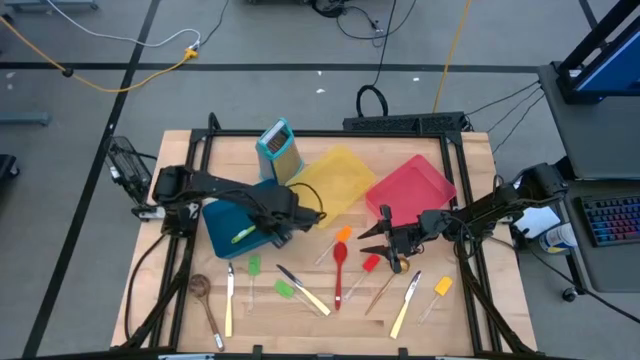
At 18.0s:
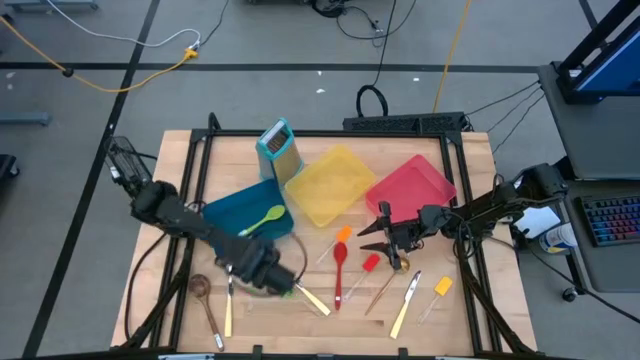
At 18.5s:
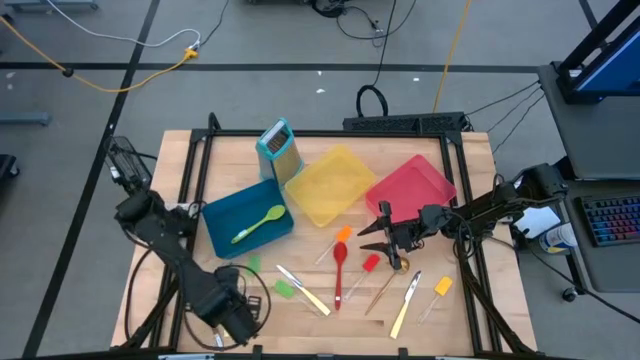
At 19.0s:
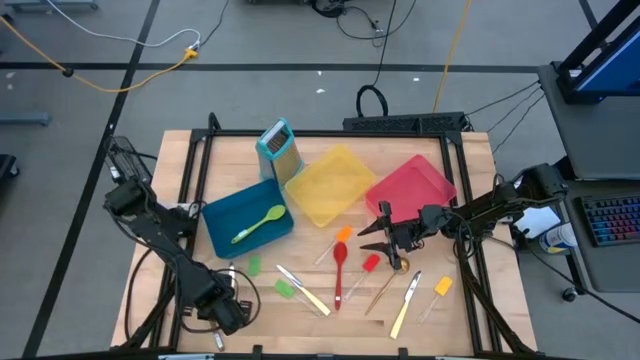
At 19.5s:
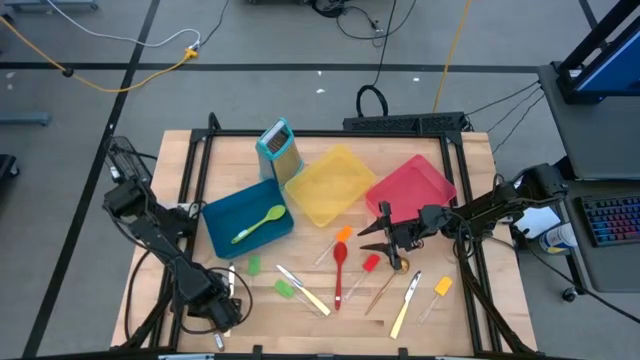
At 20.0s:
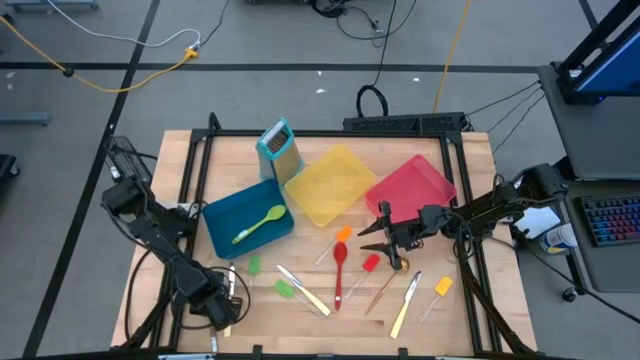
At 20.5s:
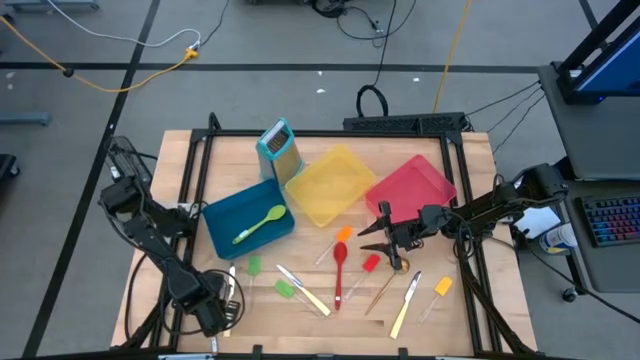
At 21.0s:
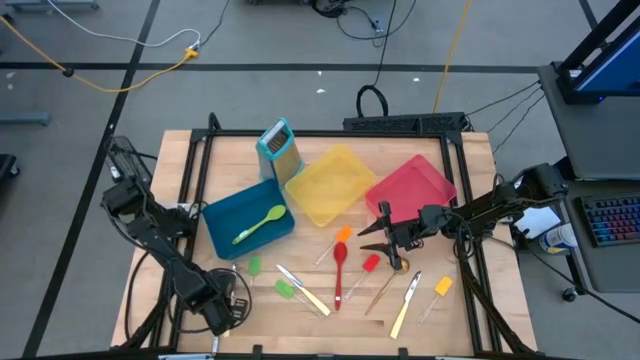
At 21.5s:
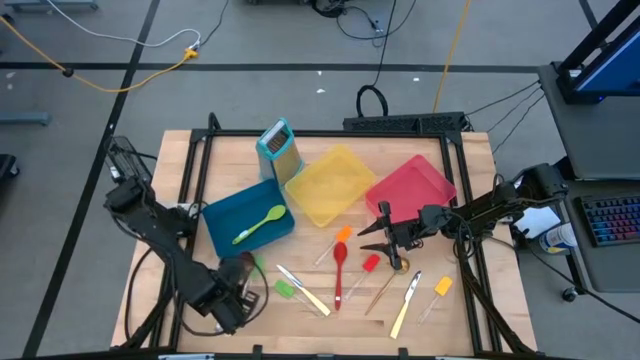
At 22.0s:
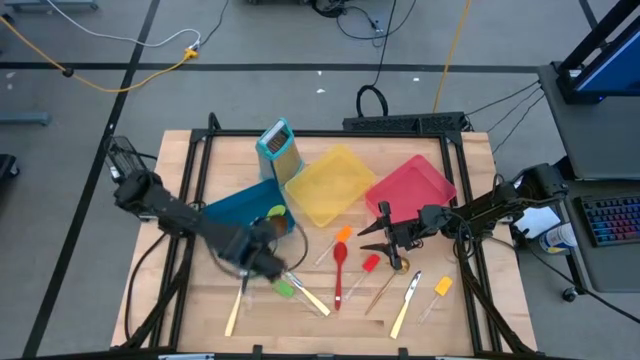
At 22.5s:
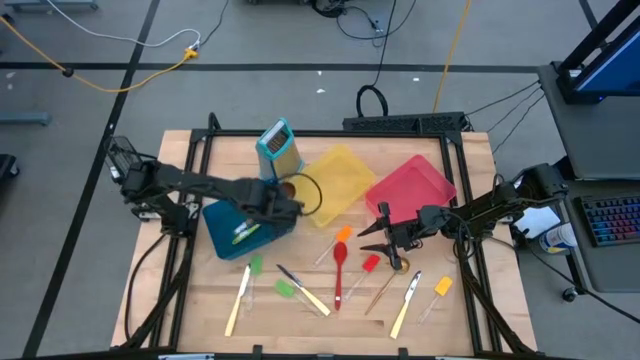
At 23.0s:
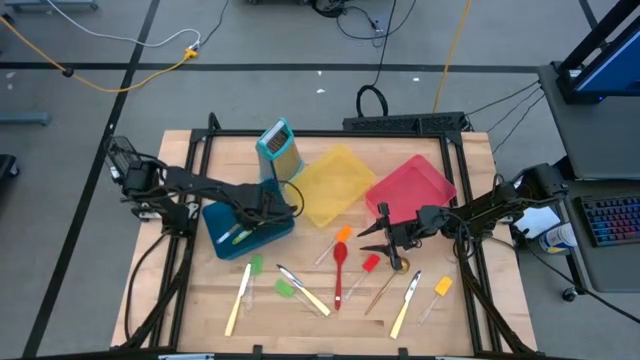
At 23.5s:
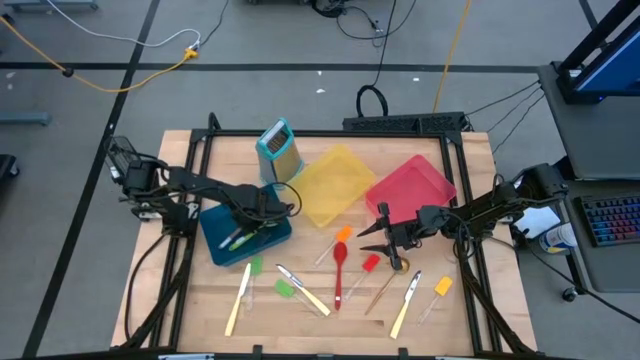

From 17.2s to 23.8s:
Task: Pick & Place Kitchen Items
Put the brown serving spoon into the blue bin

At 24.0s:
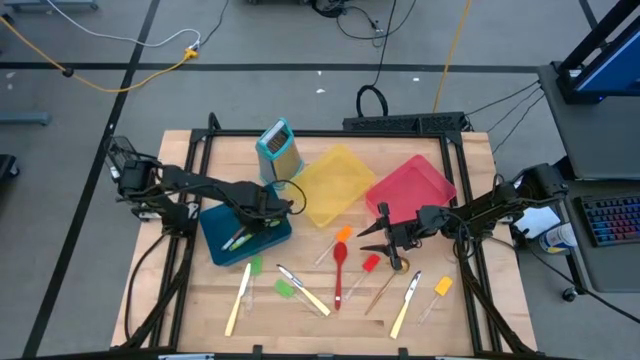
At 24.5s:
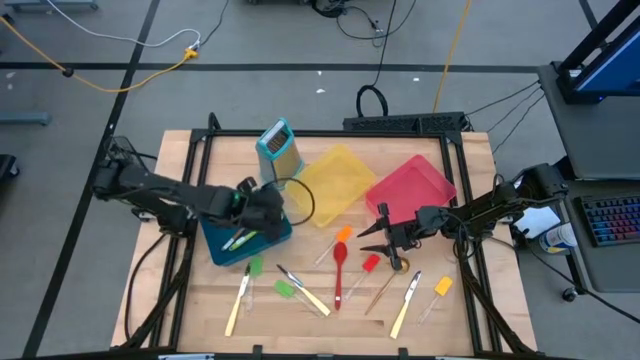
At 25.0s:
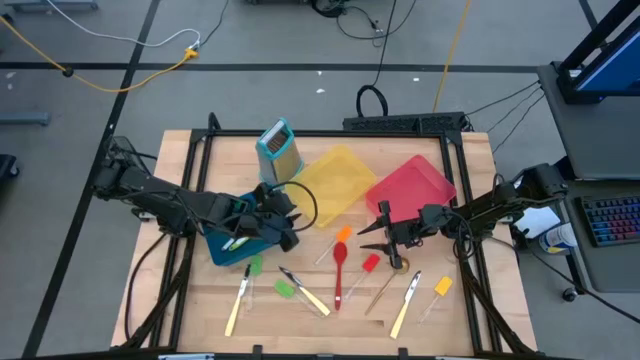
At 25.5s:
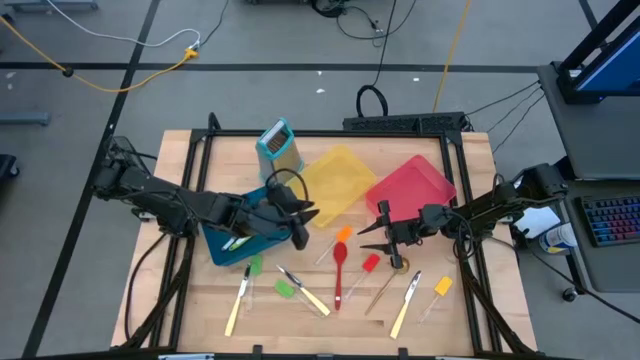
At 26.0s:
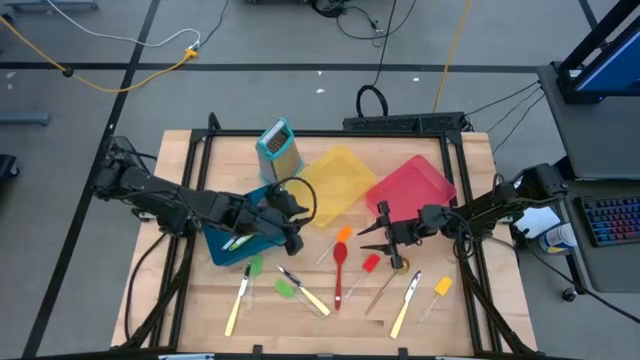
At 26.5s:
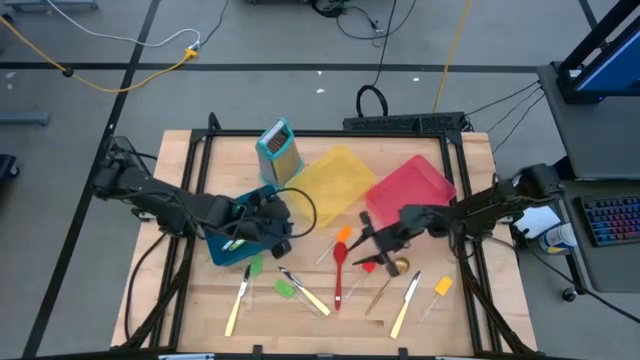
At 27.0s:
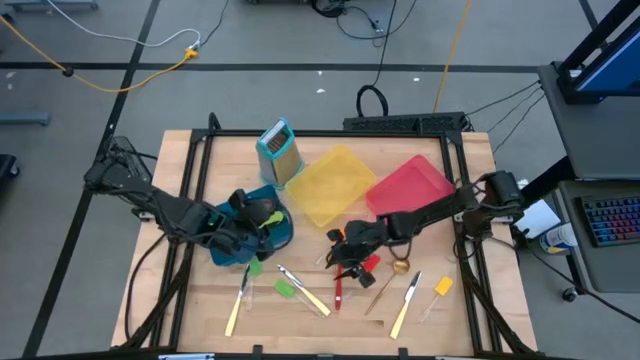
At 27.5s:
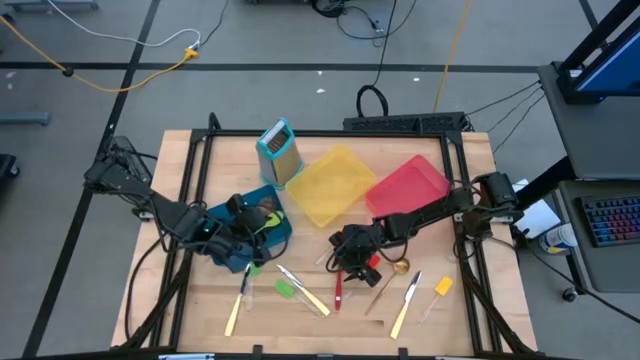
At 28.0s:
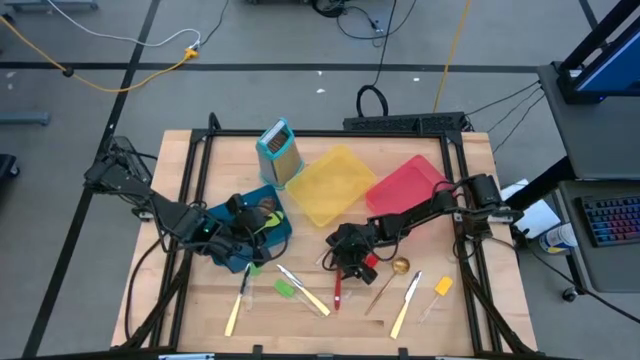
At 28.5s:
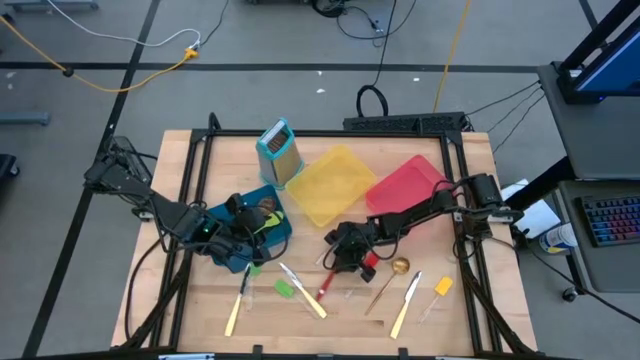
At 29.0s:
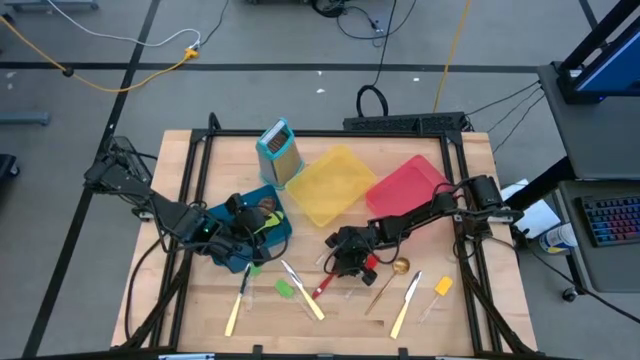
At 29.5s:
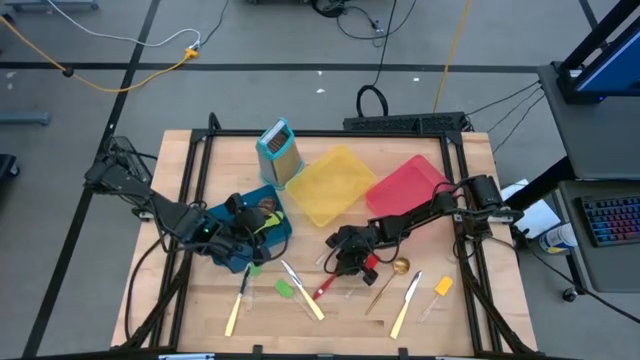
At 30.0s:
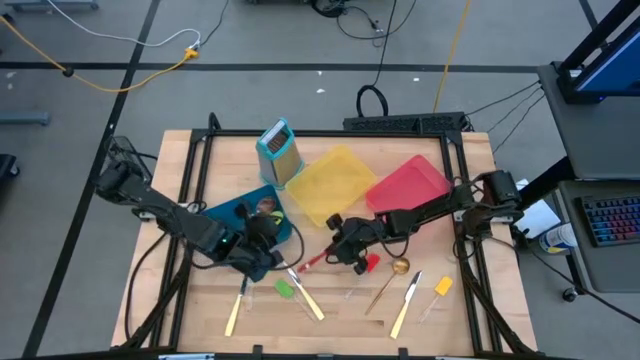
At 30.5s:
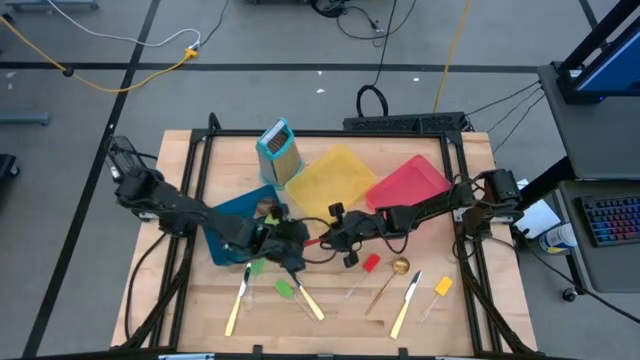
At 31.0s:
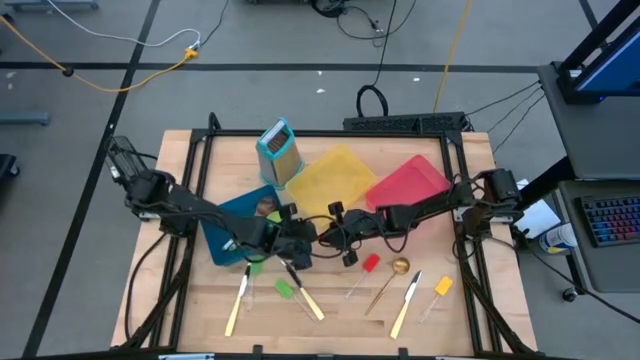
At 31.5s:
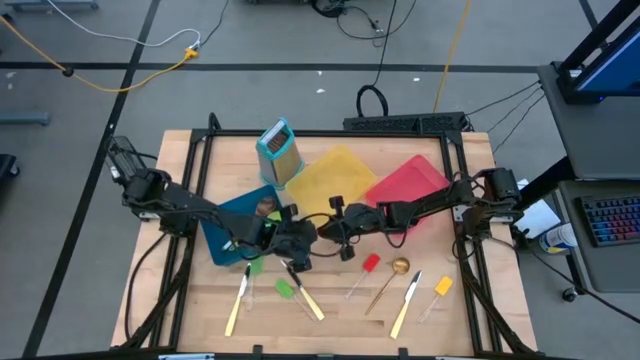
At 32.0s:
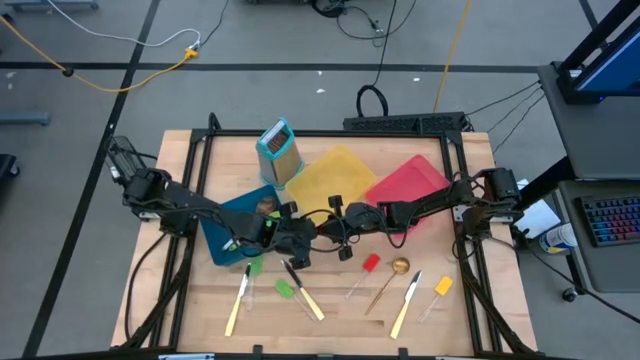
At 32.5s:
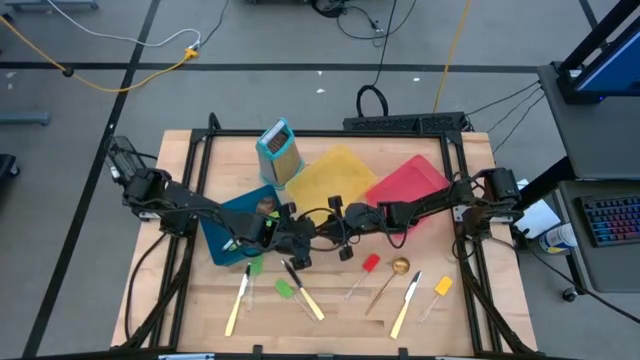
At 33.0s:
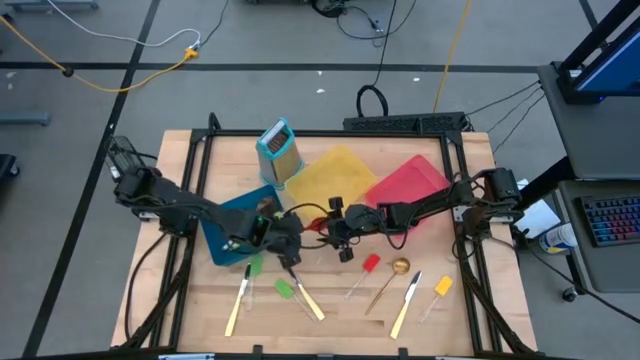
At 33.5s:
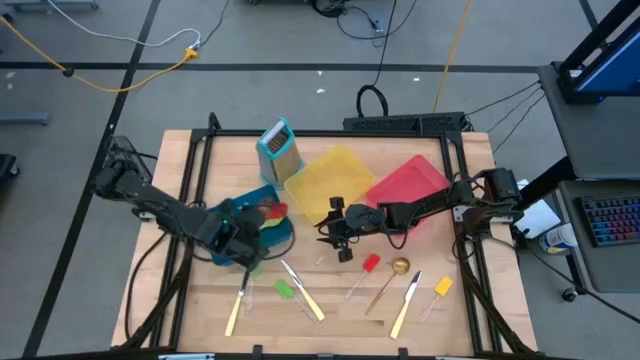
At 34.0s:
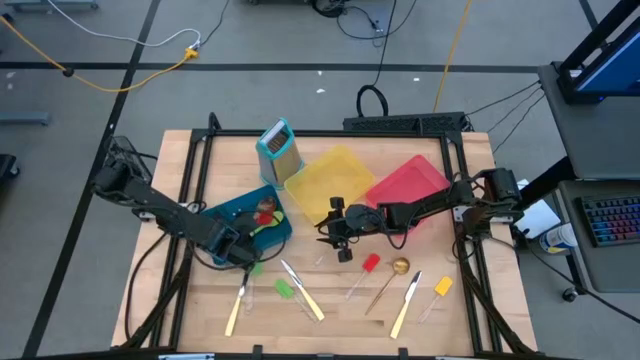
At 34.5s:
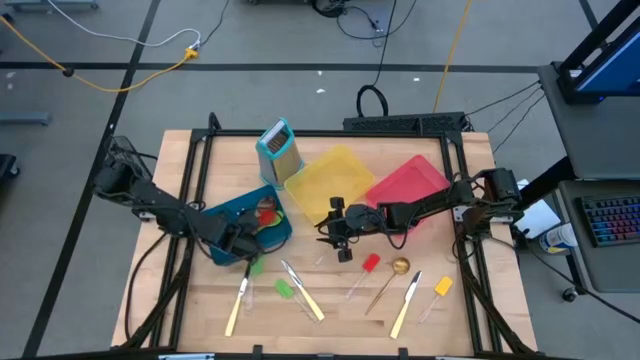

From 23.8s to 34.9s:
Put the red serving spoon into the blue bin

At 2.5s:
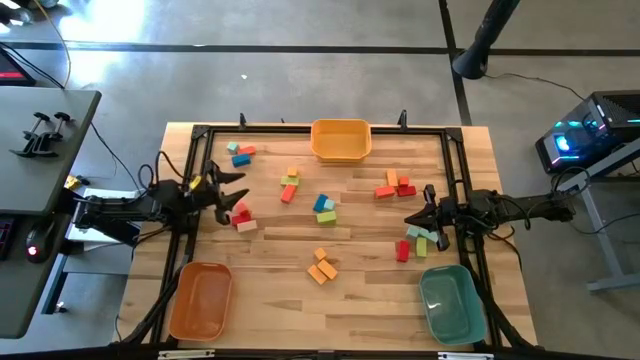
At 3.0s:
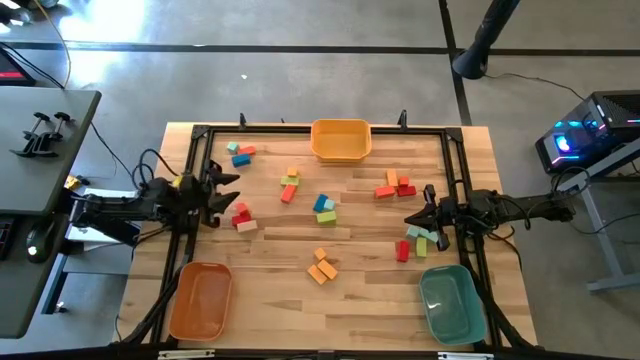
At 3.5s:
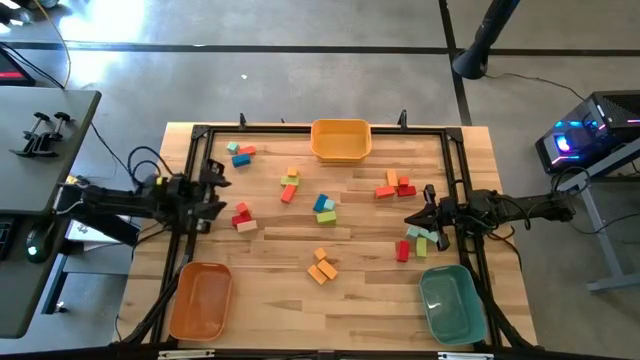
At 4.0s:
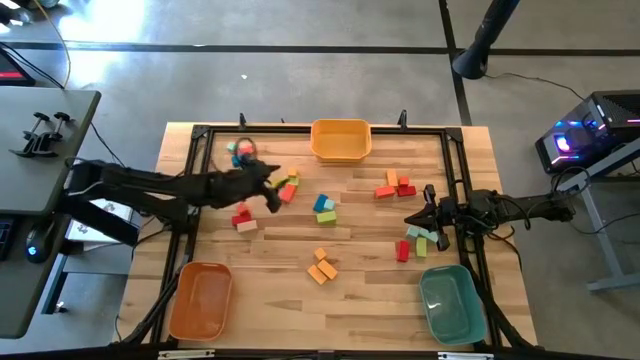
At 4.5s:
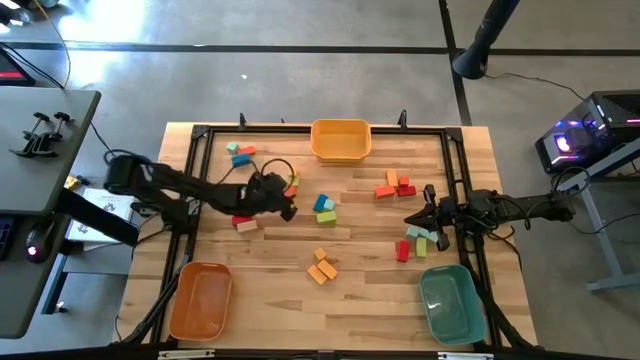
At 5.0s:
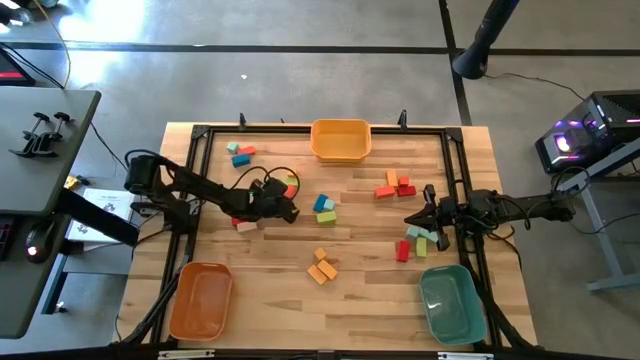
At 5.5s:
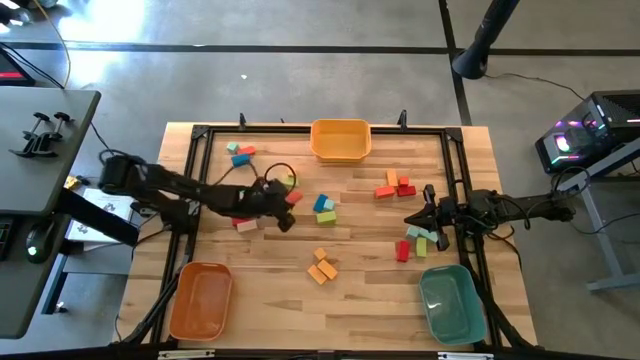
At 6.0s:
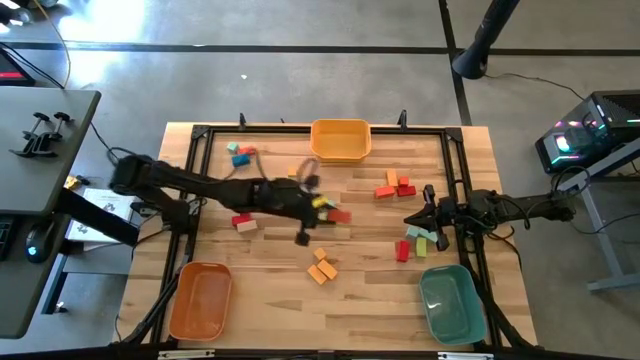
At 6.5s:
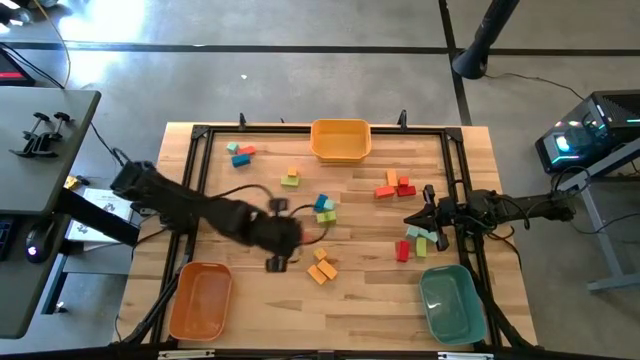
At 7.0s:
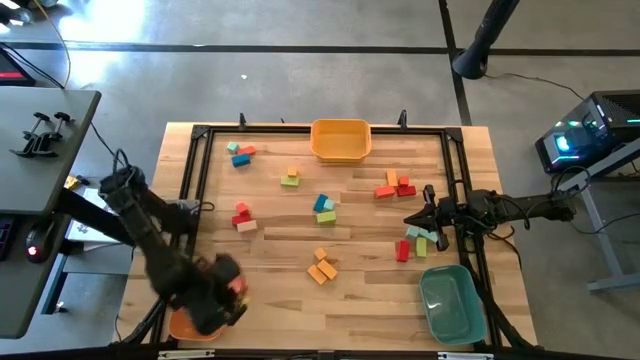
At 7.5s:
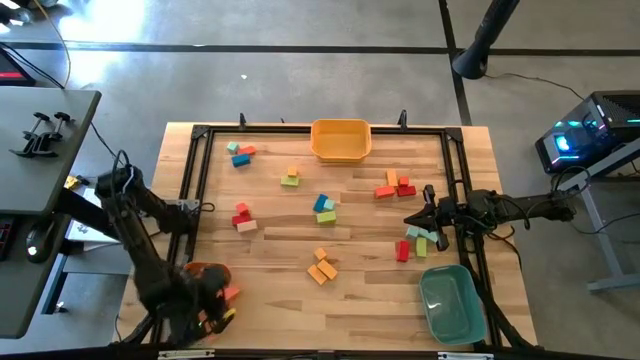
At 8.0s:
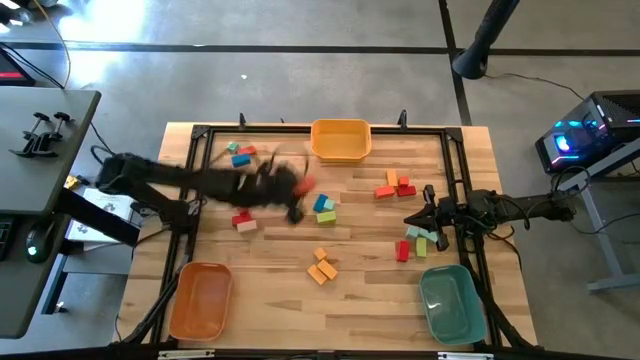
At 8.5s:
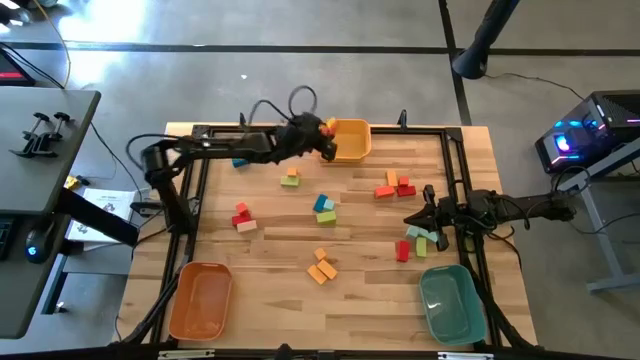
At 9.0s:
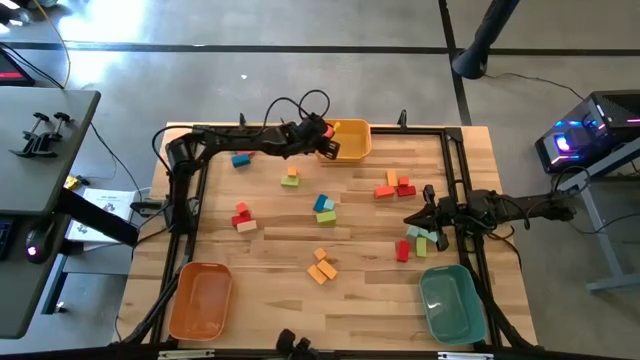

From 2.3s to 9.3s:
Task: Sort blocks by size
Put the orange wide rectangular block into the yellow bin
